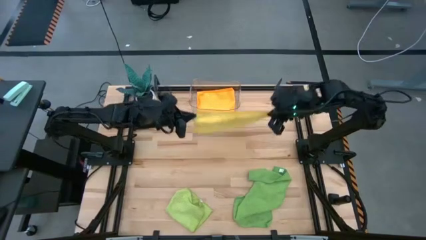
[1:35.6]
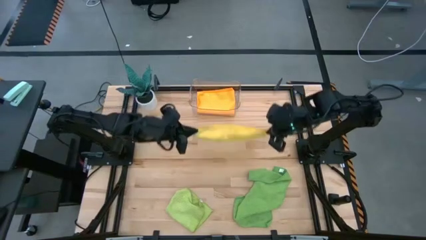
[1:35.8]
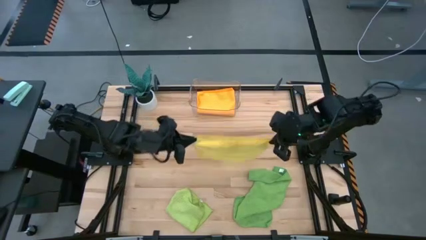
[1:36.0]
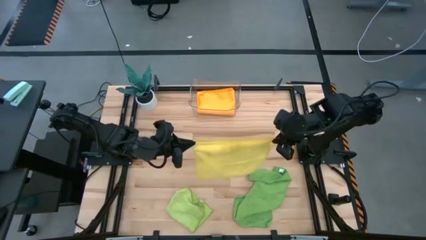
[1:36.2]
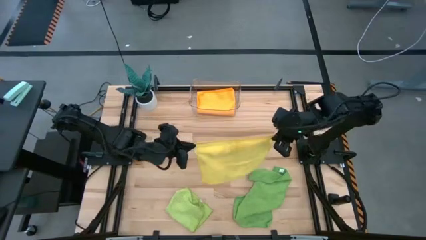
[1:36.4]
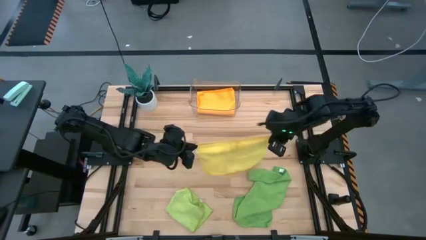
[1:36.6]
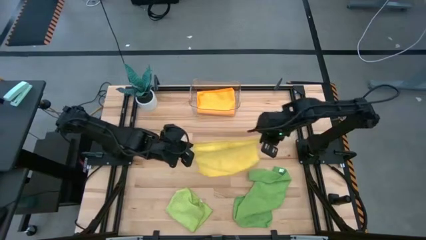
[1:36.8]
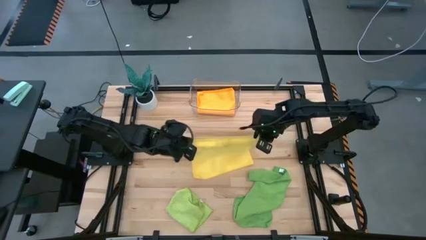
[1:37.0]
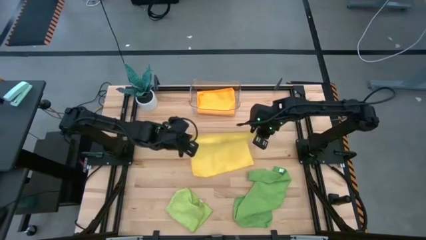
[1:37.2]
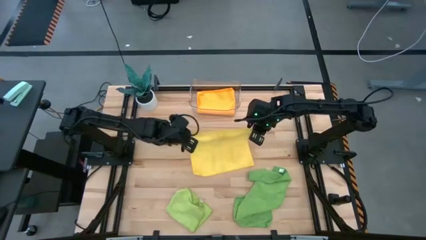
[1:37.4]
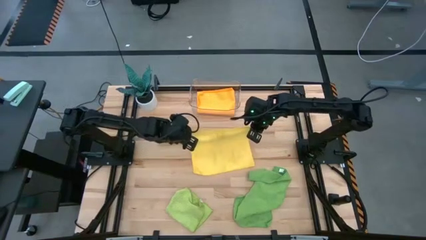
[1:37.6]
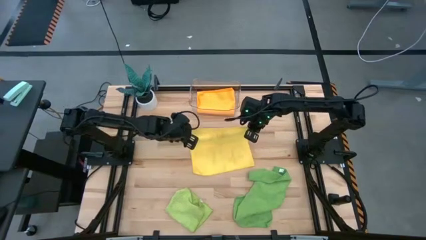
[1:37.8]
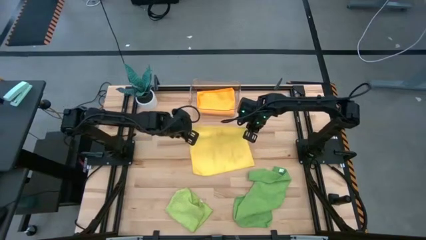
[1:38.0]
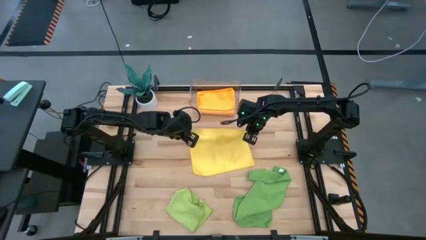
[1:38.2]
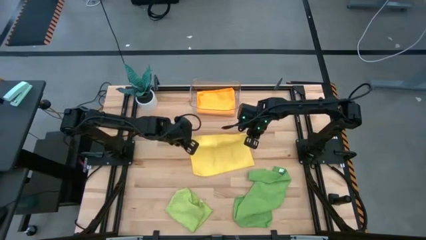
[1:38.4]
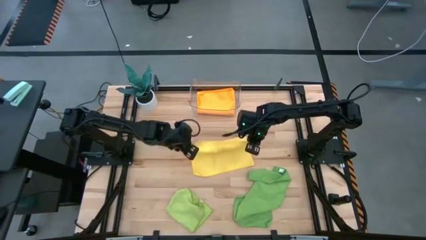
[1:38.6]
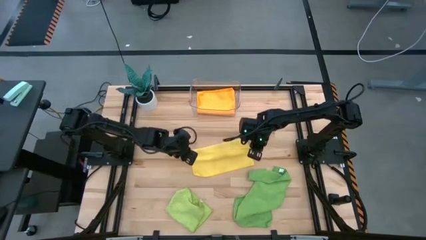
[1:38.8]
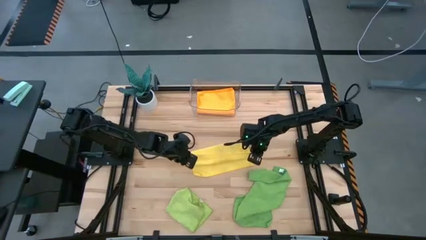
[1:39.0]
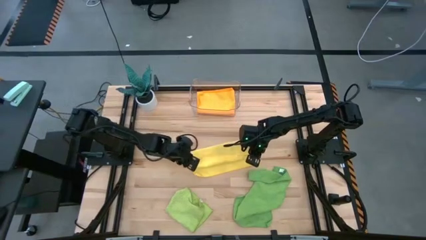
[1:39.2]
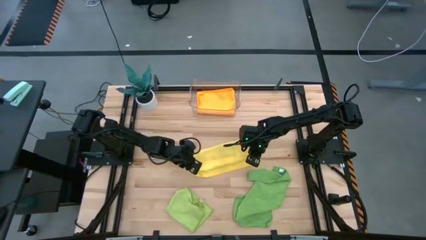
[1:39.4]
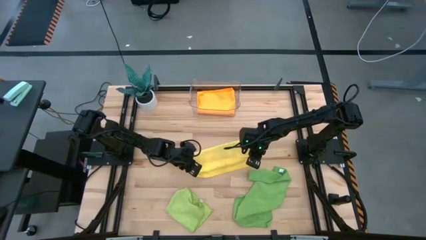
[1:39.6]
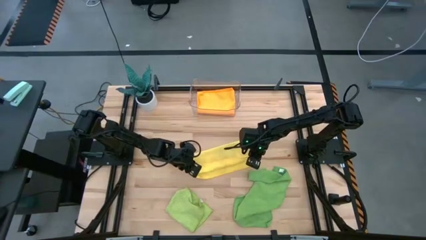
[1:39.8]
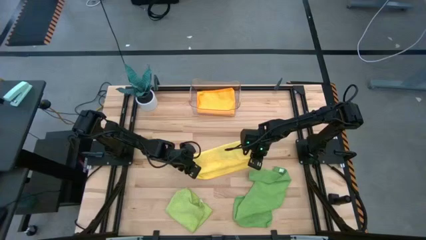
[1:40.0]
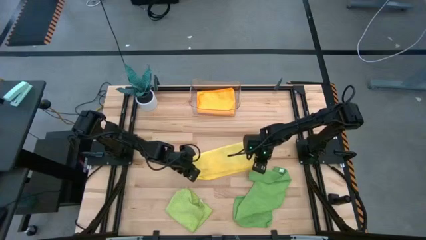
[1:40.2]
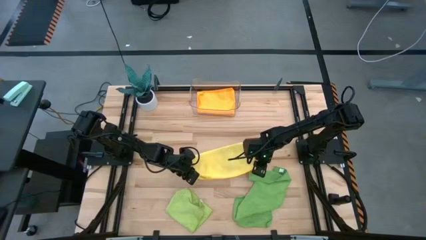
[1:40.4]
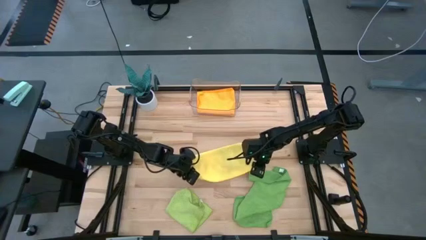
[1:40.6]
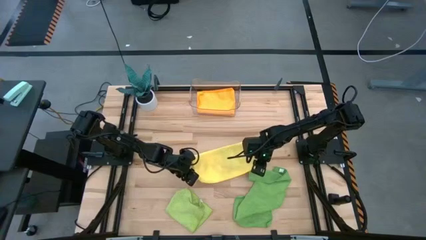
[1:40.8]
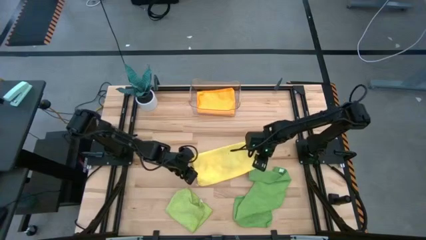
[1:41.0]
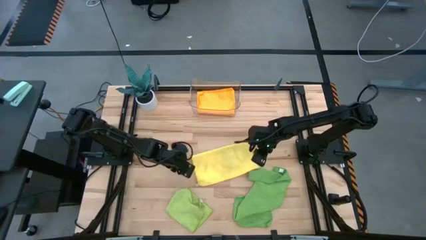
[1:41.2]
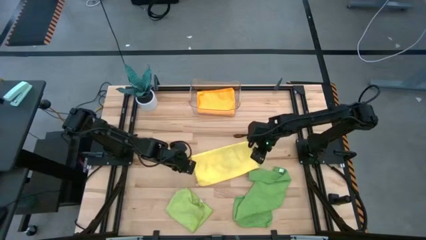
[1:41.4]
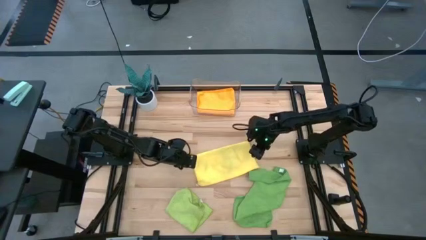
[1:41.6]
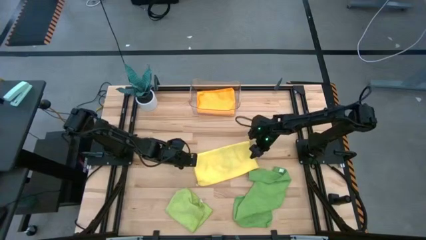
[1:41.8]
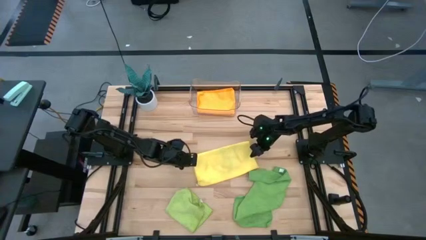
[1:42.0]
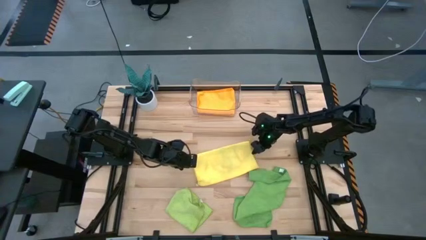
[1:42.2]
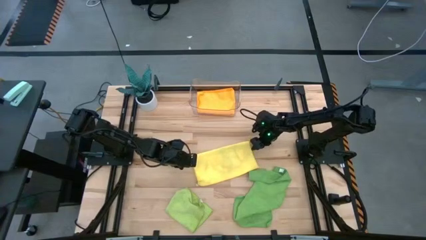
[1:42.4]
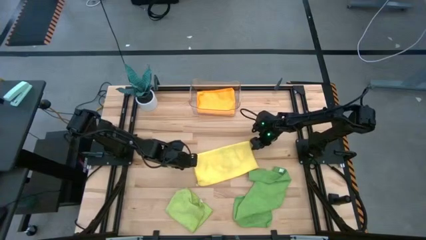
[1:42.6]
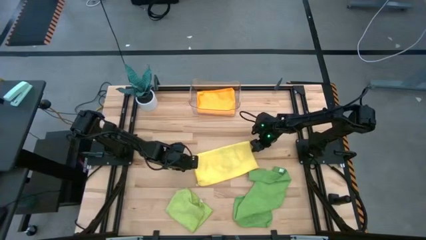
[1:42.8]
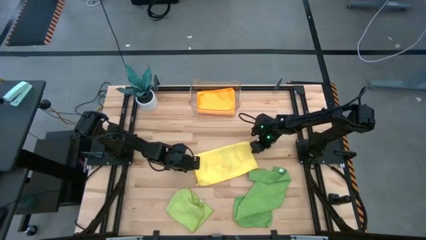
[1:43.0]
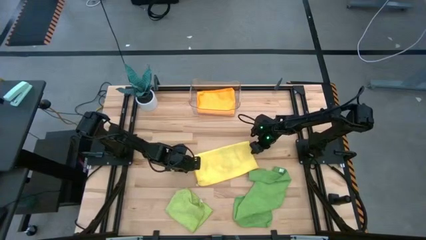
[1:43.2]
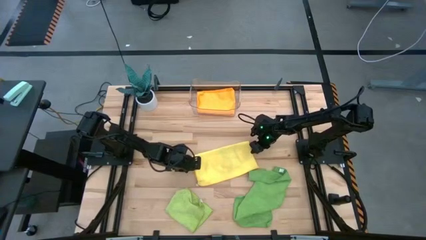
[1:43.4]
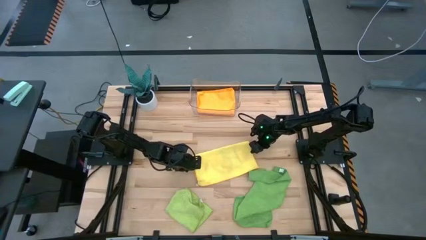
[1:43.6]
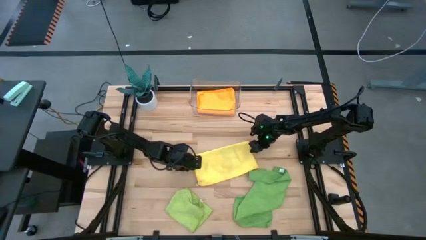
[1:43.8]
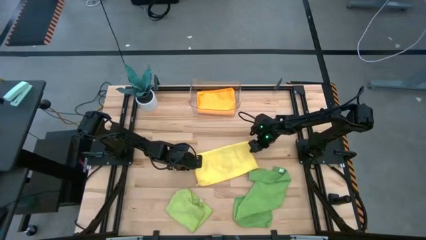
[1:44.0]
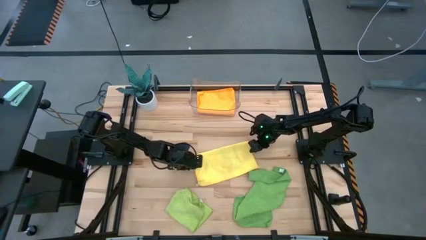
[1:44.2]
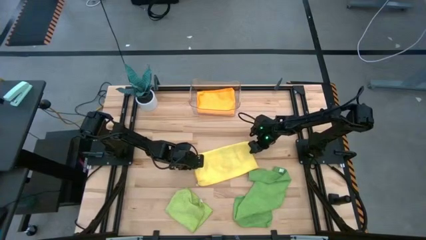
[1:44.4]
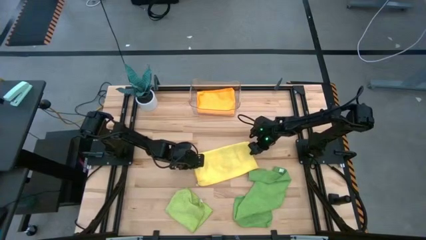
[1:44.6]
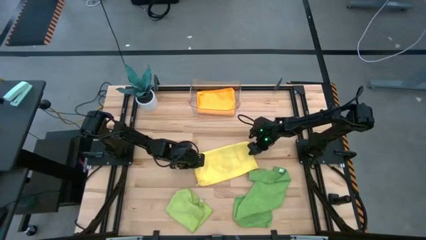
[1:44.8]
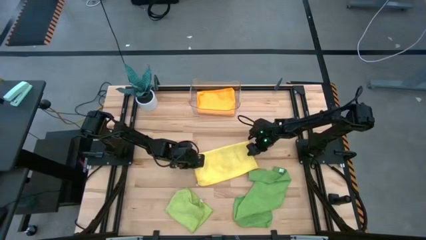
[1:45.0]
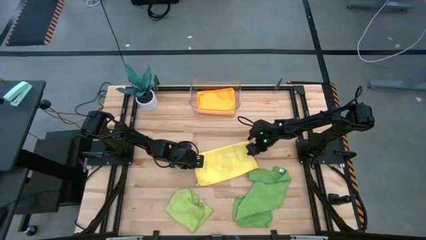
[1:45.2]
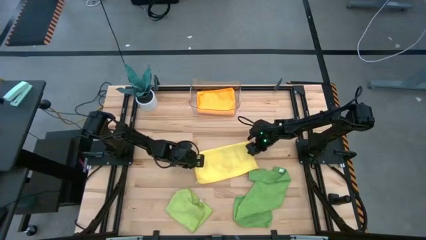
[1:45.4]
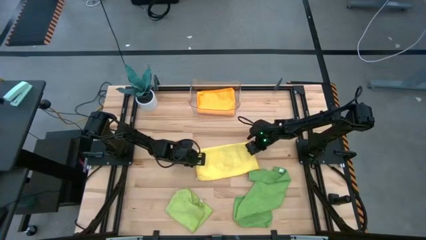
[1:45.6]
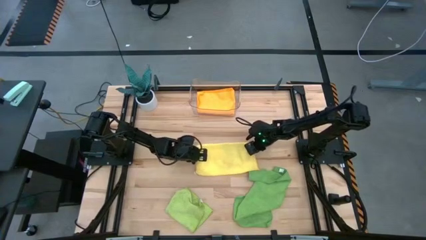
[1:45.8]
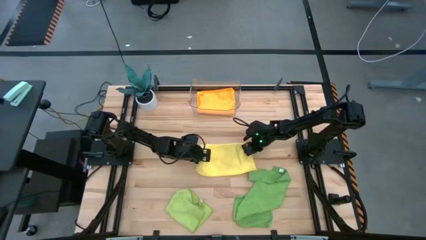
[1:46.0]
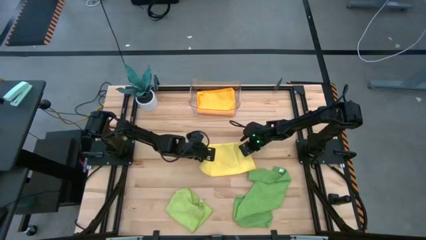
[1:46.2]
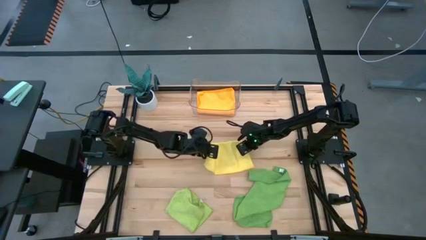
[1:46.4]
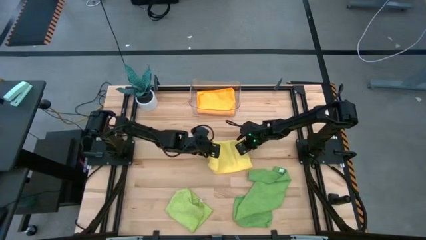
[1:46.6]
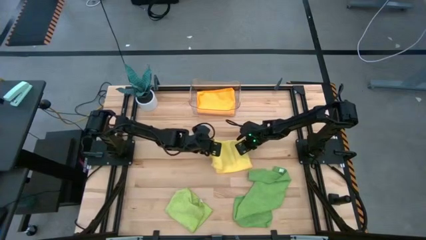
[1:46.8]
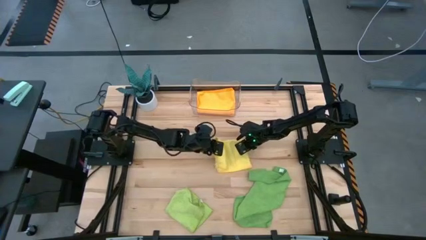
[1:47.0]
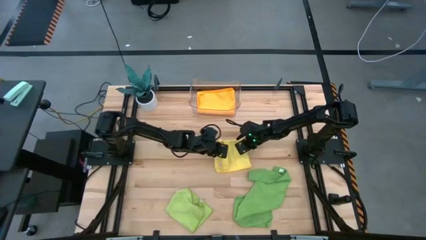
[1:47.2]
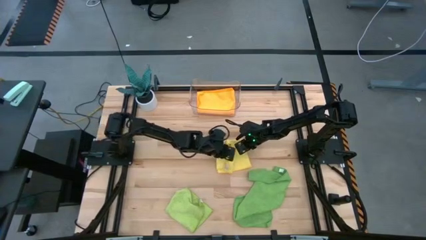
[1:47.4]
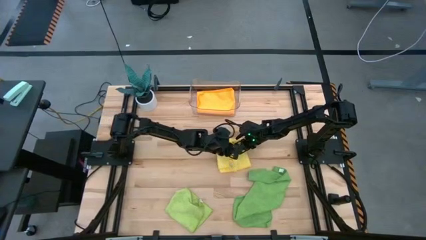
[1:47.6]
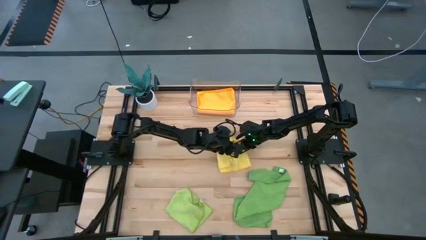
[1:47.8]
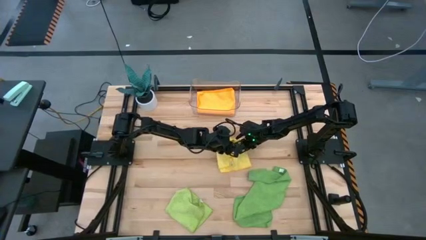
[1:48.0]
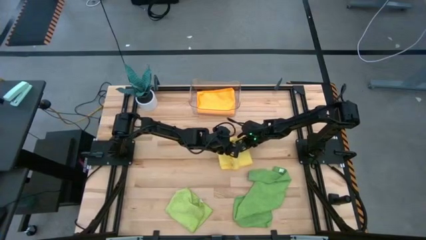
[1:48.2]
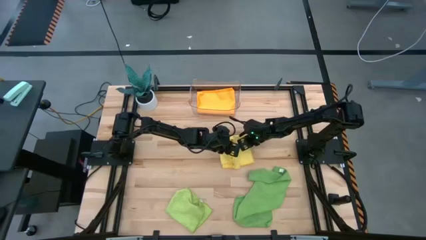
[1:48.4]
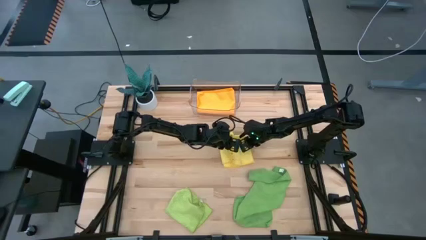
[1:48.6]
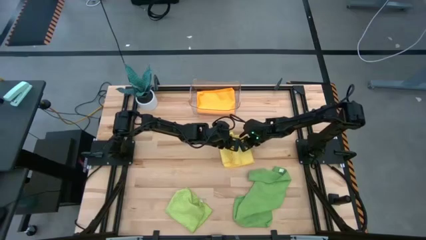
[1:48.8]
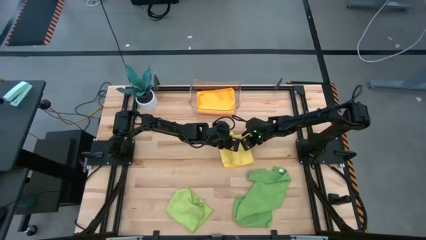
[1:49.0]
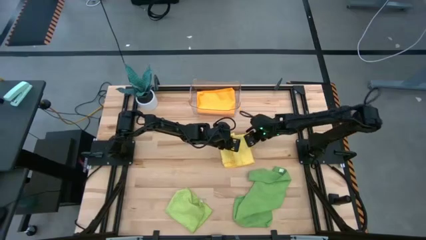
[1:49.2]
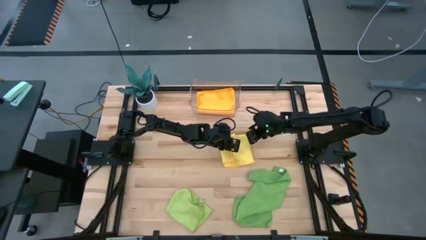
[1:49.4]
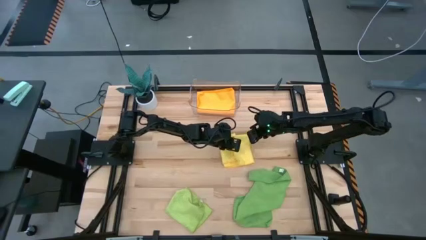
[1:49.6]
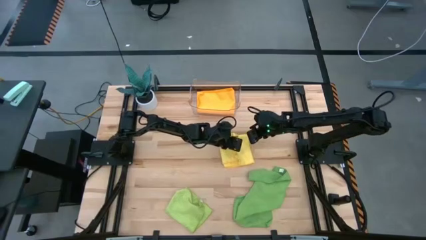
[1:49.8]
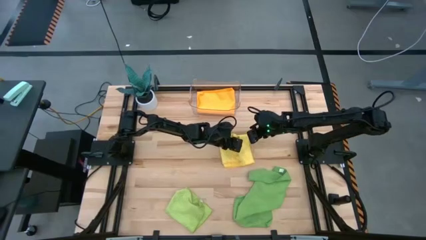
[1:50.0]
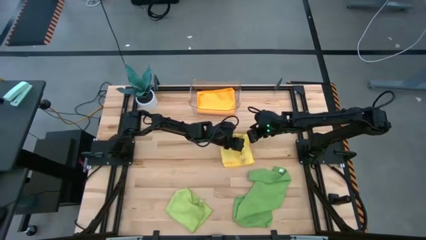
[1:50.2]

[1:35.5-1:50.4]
Task: Fold microfiber towels
Fold the yellow towel
